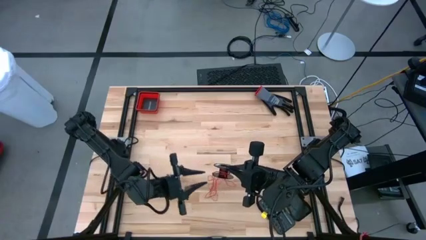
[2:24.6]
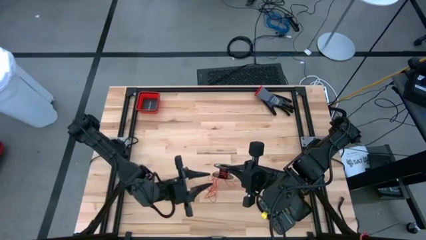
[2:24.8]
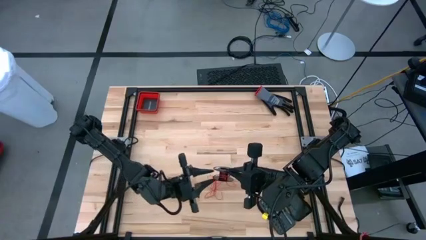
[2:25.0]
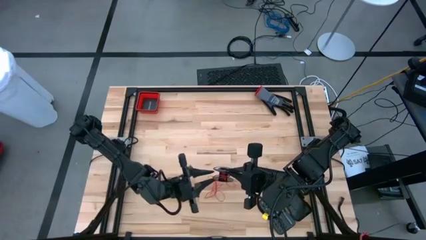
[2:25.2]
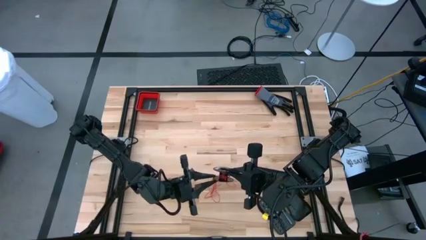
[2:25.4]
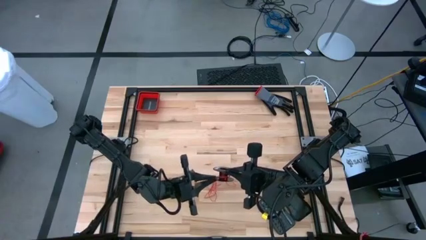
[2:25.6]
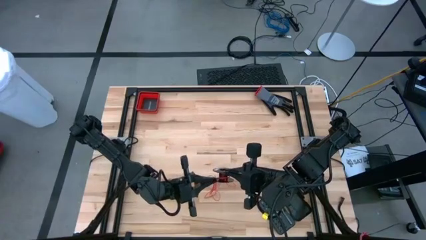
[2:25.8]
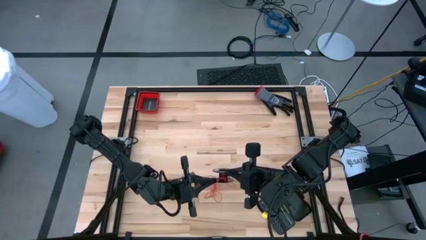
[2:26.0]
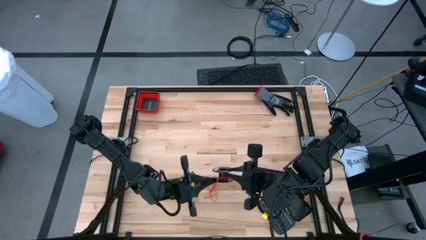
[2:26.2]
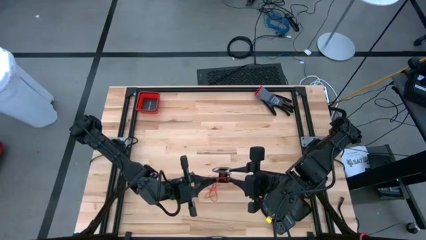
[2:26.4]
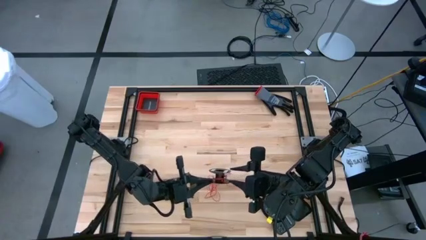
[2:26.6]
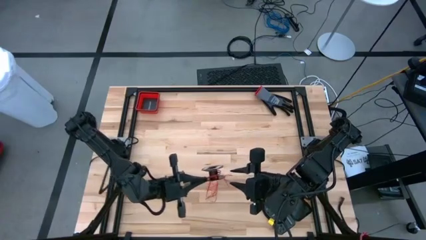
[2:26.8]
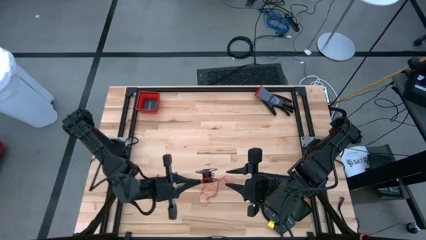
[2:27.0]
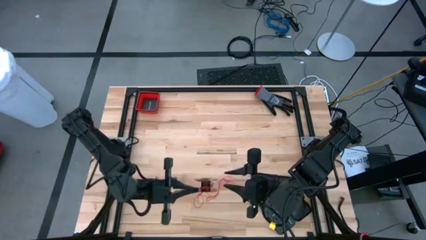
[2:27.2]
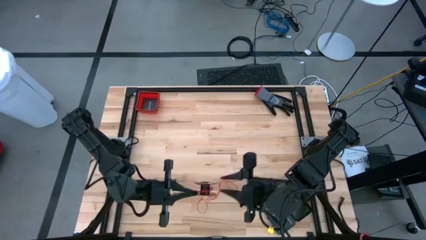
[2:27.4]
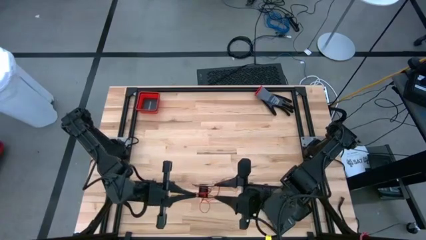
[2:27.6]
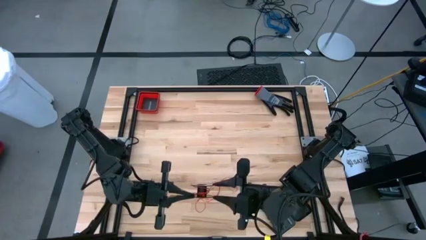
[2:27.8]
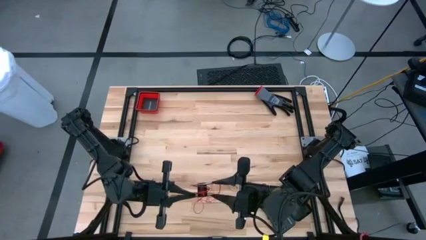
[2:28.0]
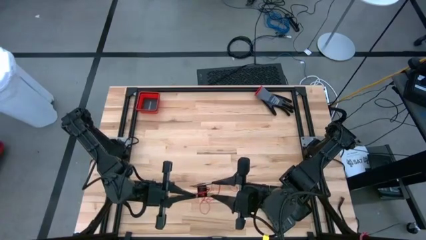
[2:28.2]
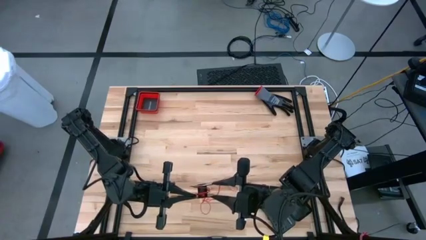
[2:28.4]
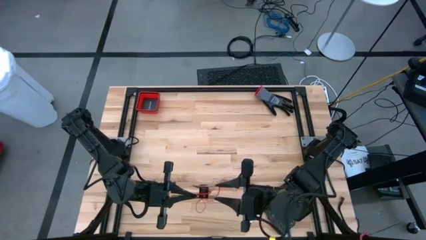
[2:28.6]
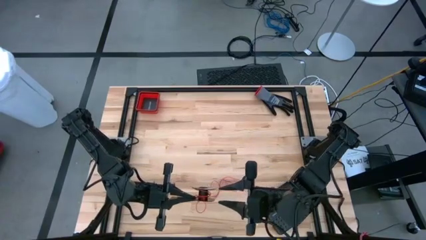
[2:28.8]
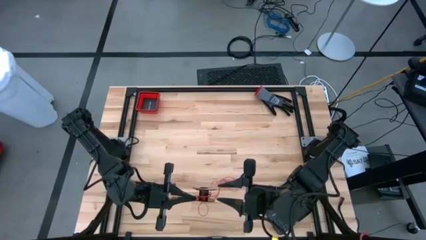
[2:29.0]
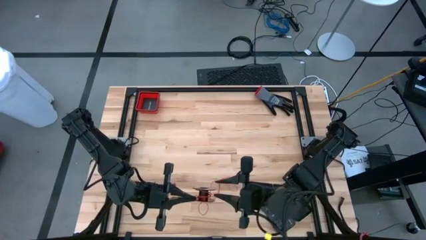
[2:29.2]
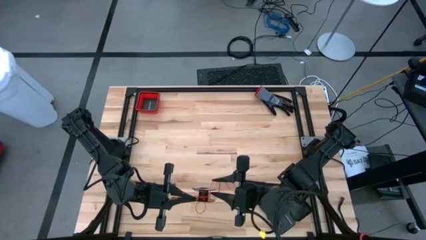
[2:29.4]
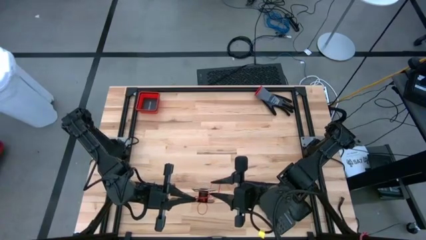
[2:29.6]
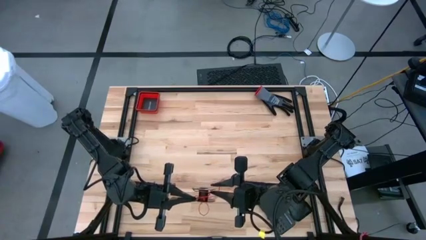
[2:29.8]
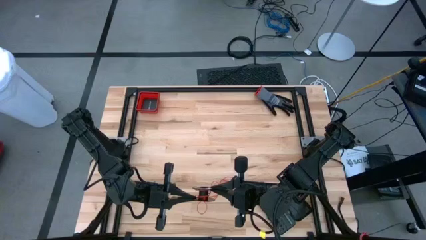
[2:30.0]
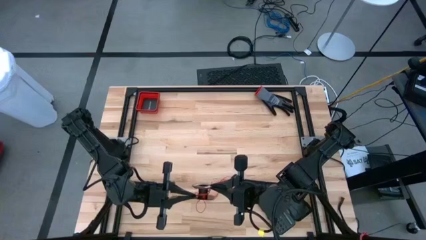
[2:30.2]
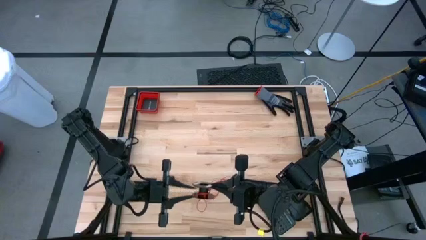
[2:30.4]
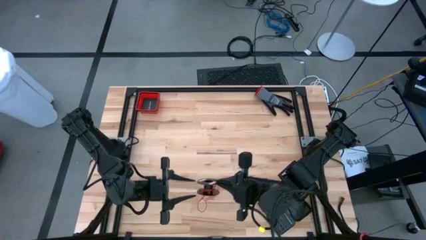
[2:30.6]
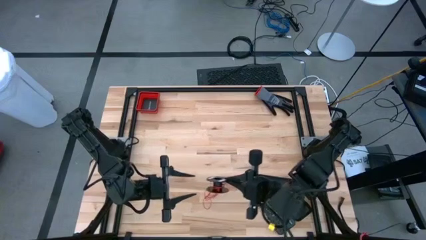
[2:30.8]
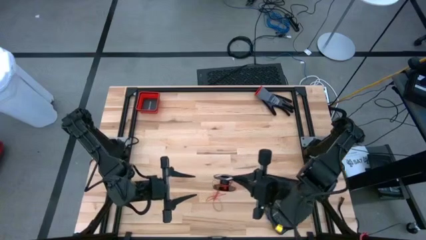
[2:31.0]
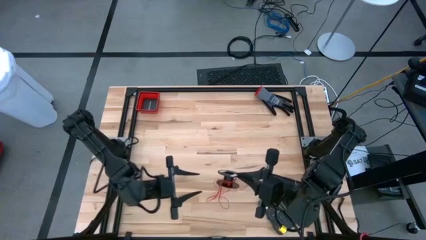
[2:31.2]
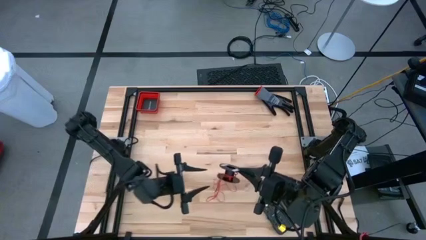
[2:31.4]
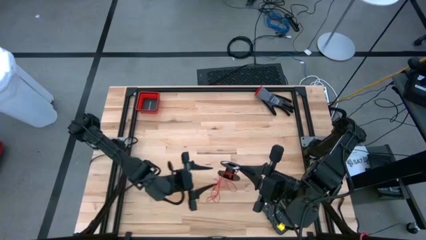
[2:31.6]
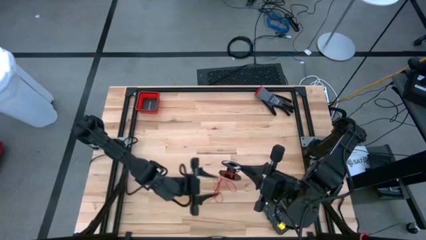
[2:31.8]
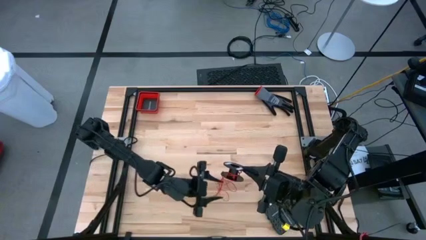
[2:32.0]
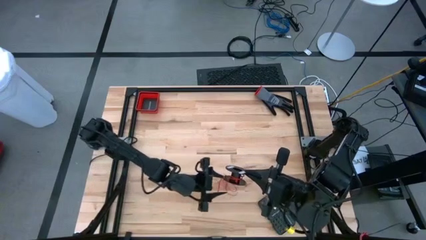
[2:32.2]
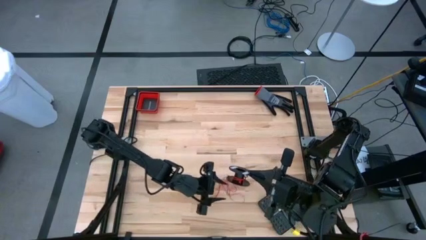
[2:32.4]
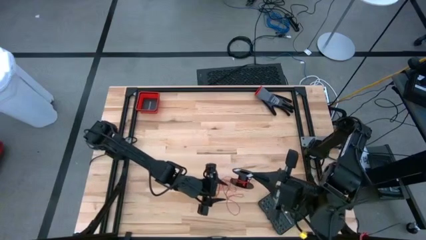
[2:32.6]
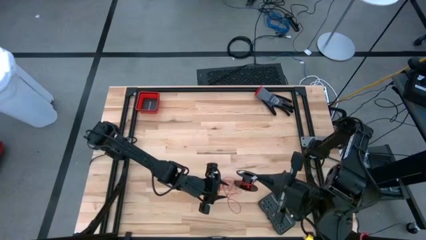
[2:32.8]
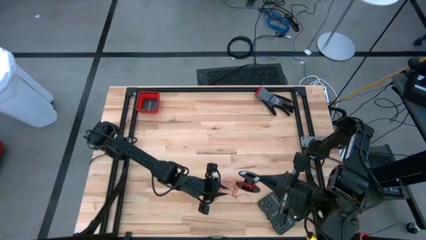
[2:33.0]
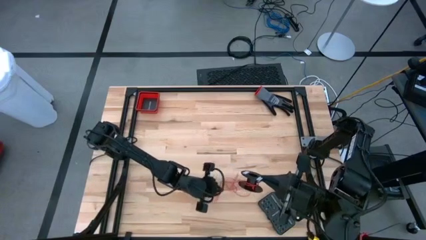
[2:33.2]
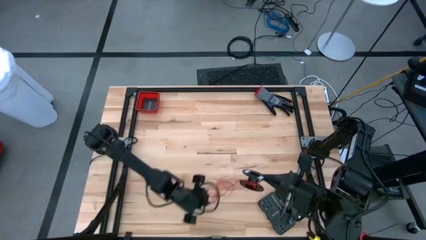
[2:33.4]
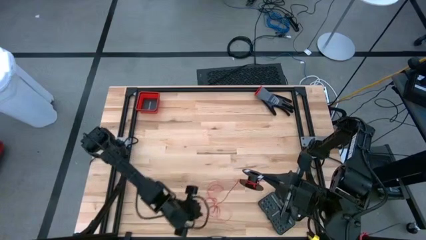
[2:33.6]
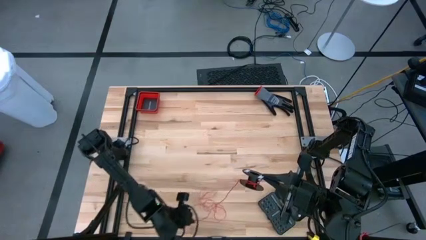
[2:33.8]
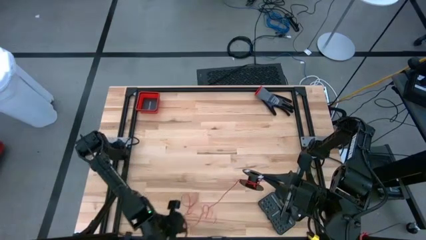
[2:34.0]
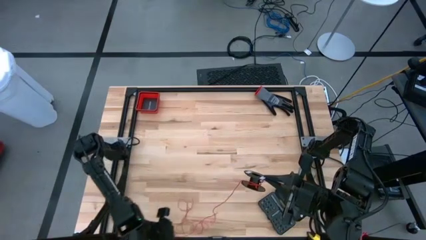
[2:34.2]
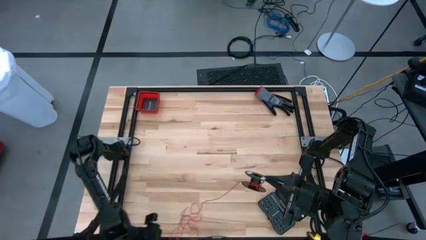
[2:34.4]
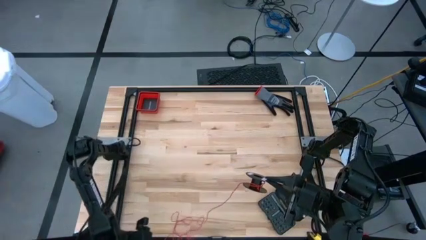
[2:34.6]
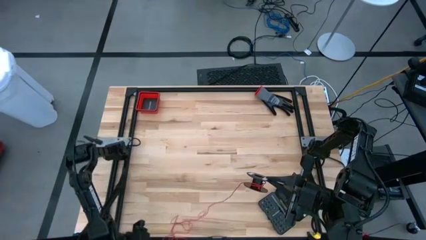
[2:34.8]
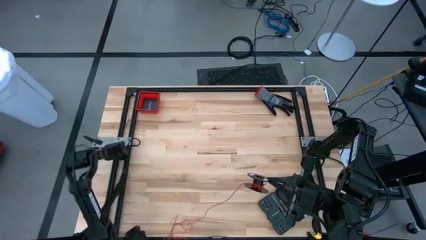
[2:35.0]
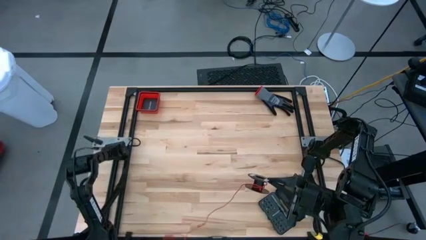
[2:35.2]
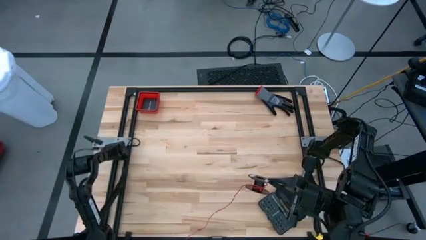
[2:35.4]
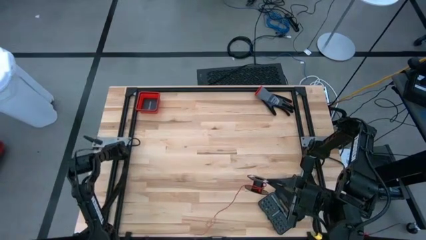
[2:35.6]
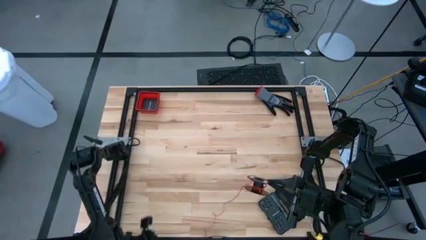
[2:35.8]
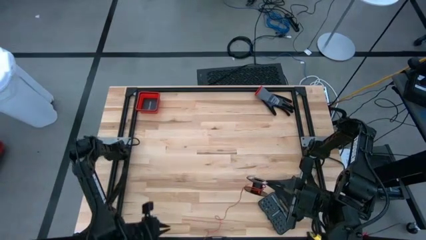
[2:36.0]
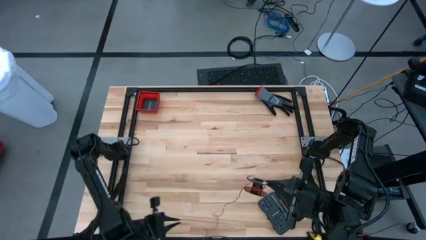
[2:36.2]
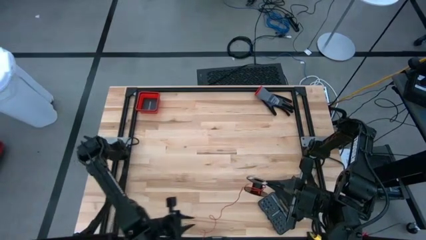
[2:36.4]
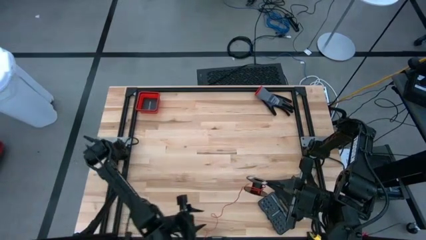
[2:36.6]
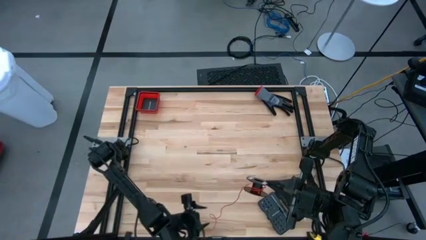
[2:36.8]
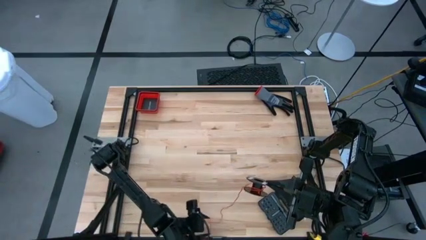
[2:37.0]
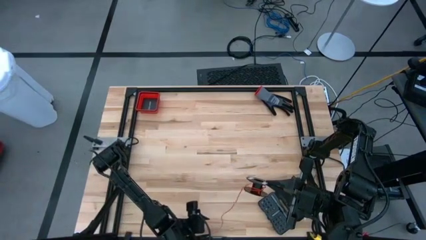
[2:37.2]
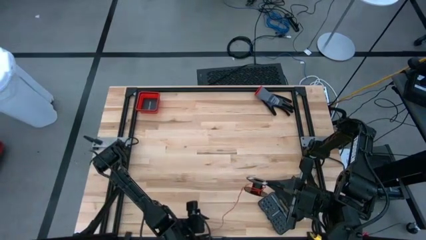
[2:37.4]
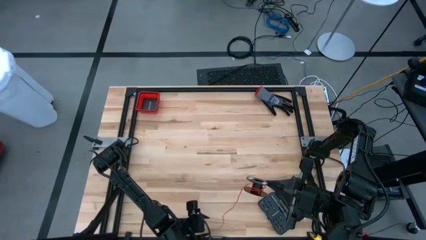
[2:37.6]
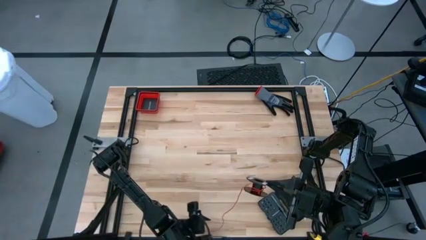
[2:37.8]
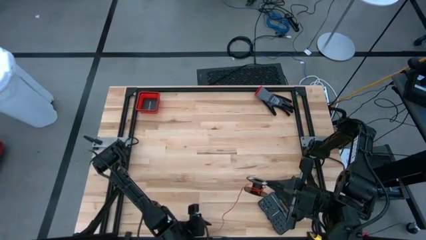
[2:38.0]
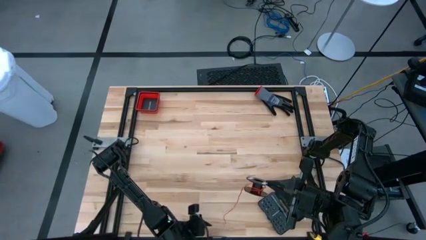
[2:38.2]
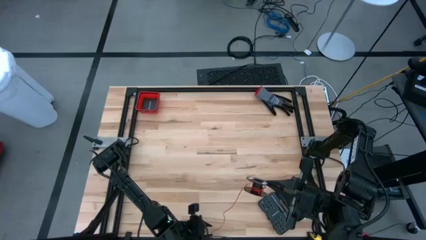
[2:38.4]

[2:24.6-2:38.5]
Task: Coil cords
Coil the red wire onto the spool
